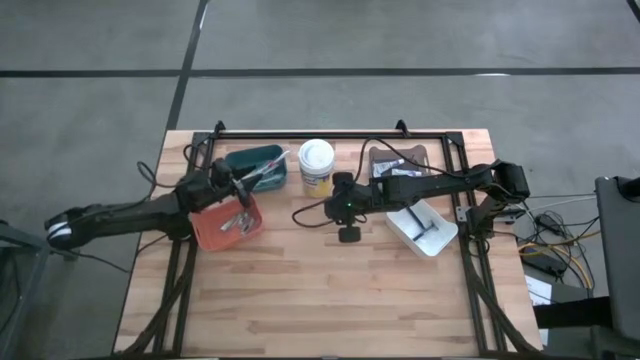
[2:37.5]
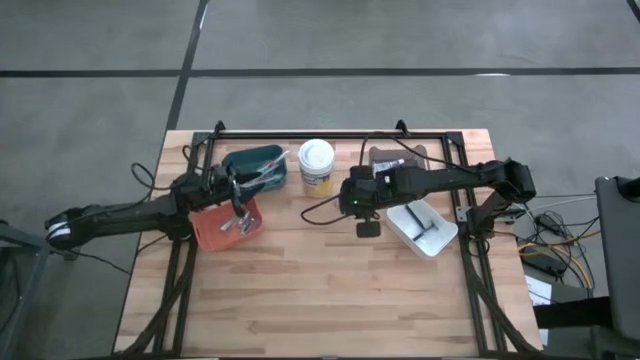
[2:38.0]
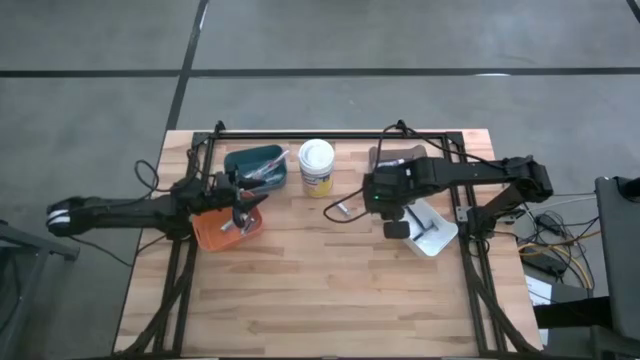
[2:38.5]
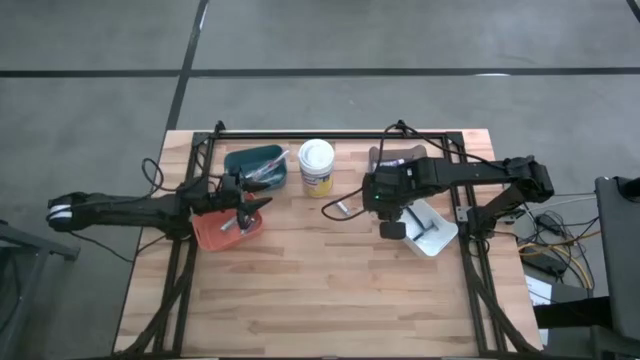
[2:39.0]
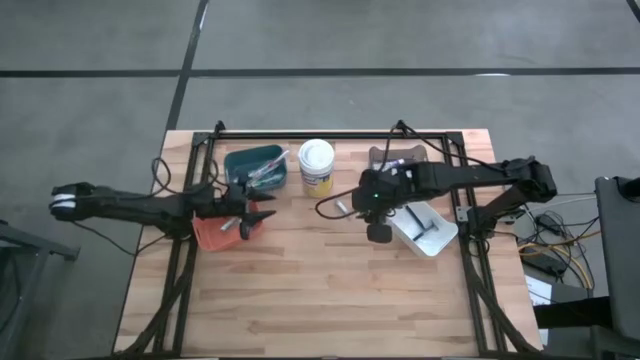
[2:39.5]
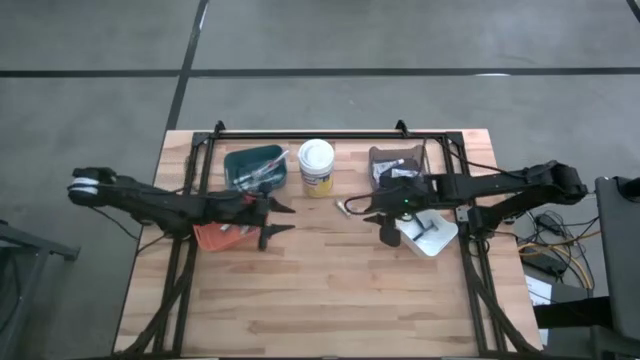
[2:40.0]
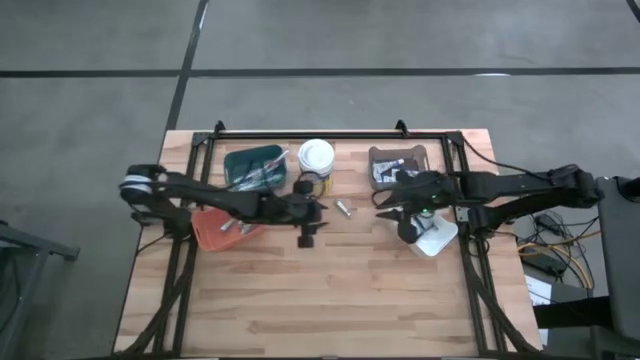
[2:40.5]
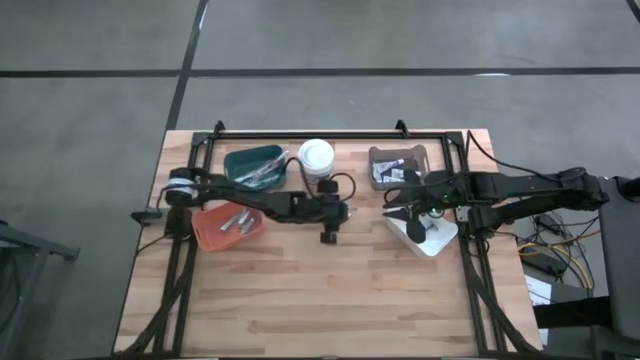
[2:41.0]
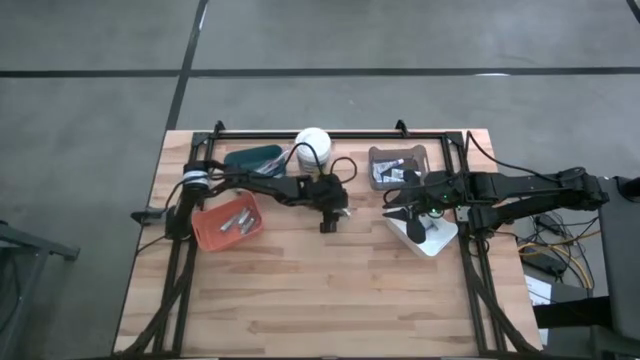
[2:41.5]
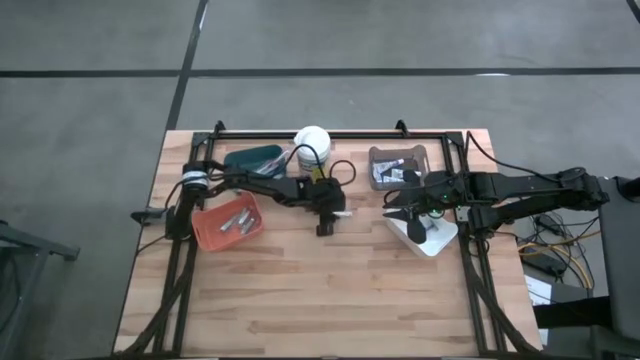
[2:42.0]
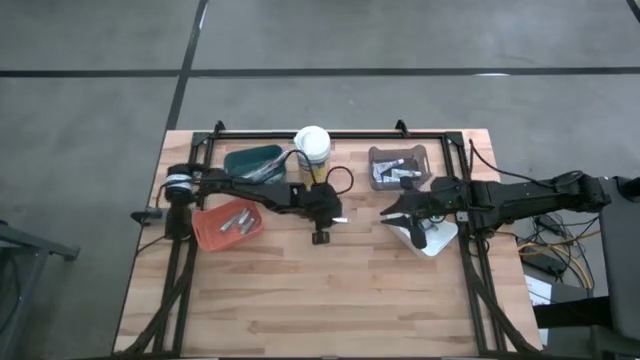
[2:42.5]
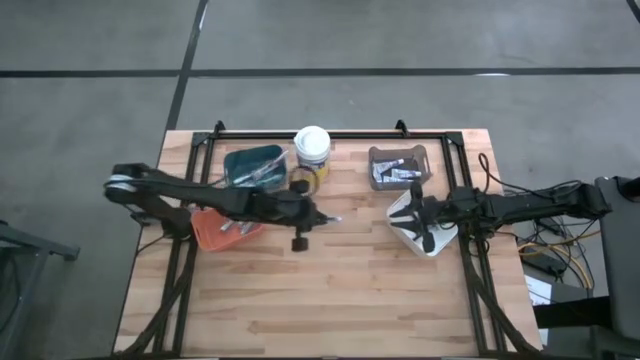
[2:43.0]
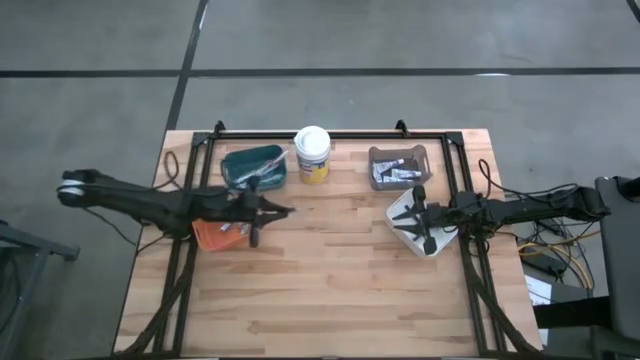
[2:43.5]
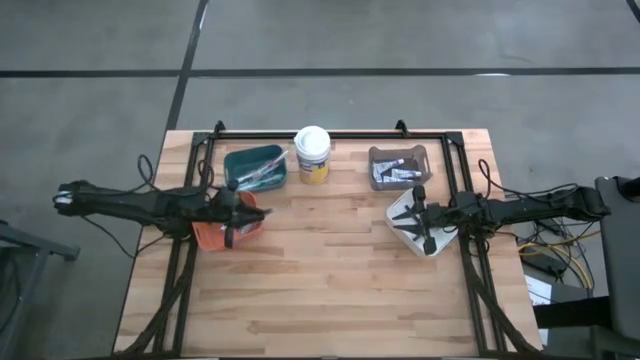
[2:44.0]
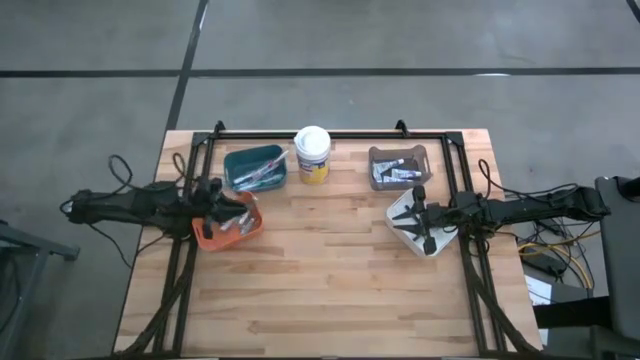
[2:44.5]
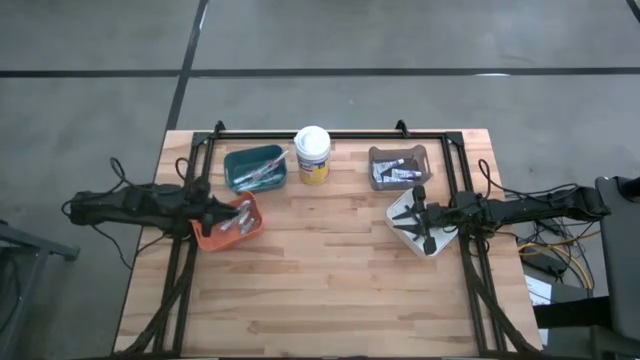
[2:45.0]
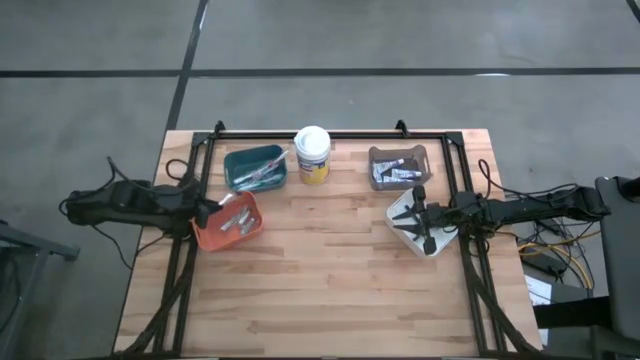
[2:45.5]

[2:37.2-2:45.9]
Task: Pick & Place Travel size toiletries
Put the nail cutter into the orange bin

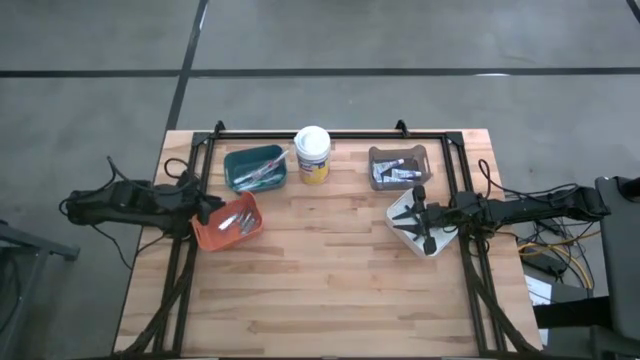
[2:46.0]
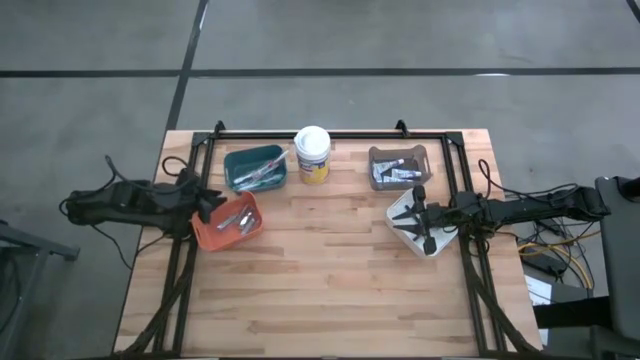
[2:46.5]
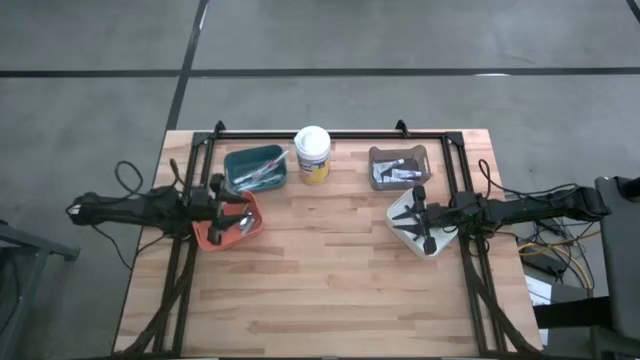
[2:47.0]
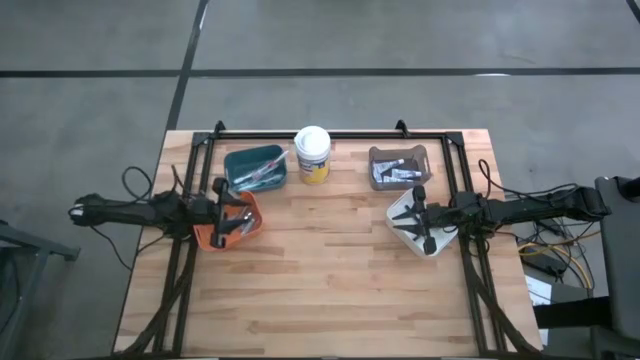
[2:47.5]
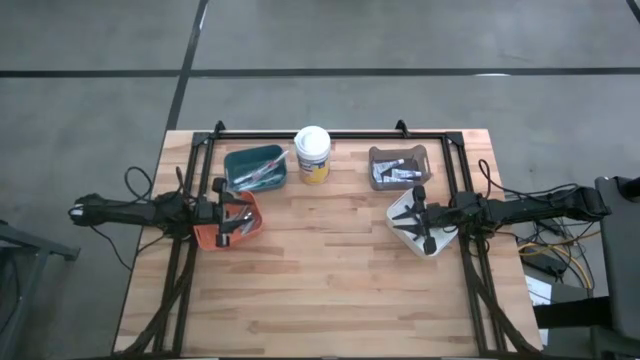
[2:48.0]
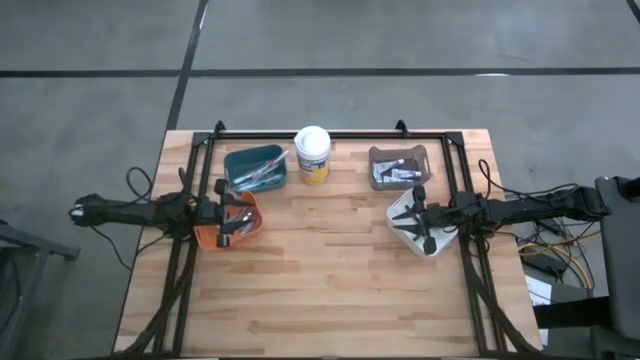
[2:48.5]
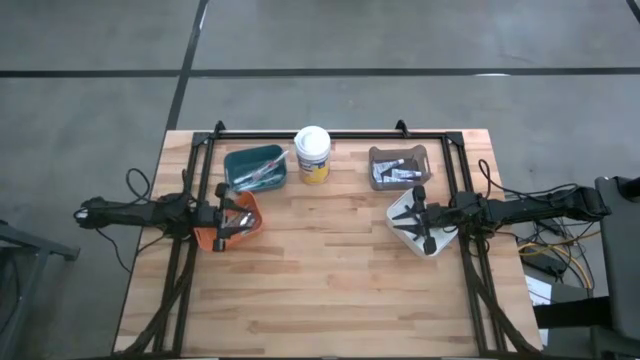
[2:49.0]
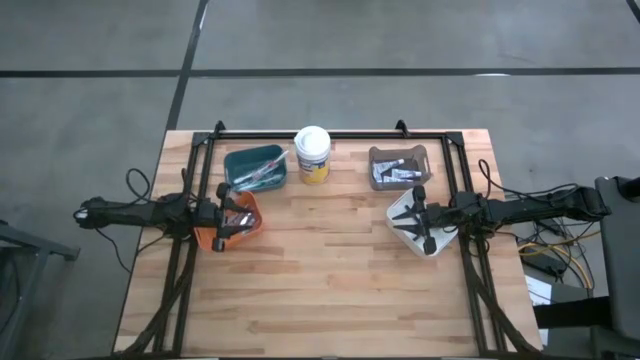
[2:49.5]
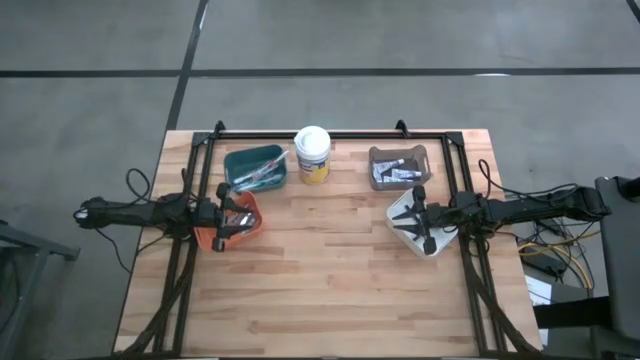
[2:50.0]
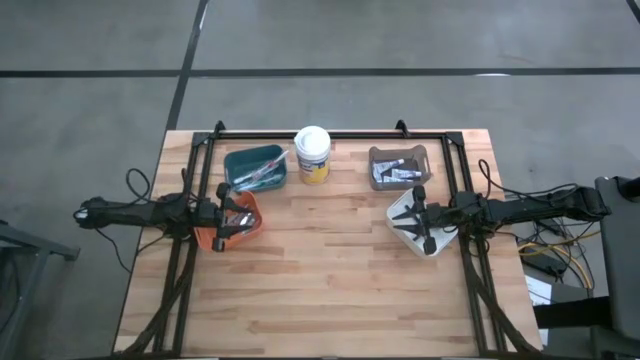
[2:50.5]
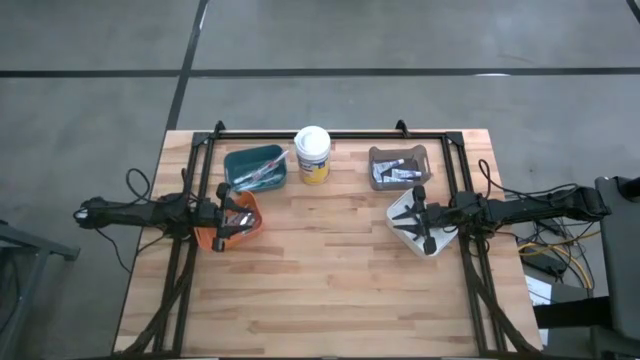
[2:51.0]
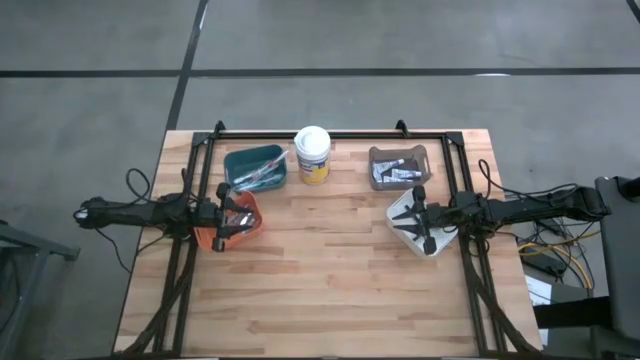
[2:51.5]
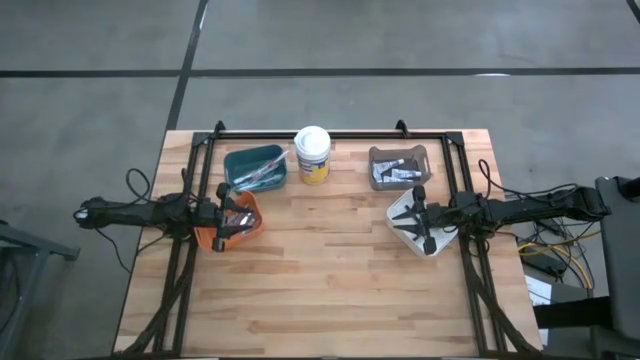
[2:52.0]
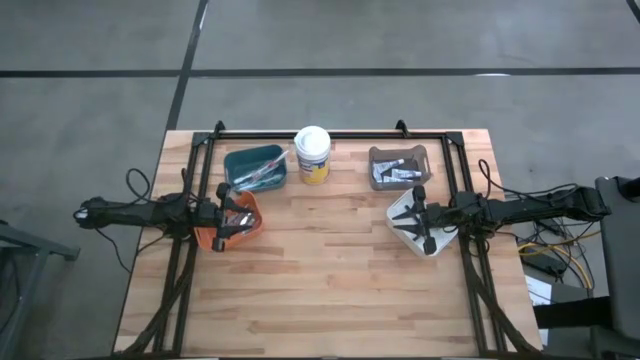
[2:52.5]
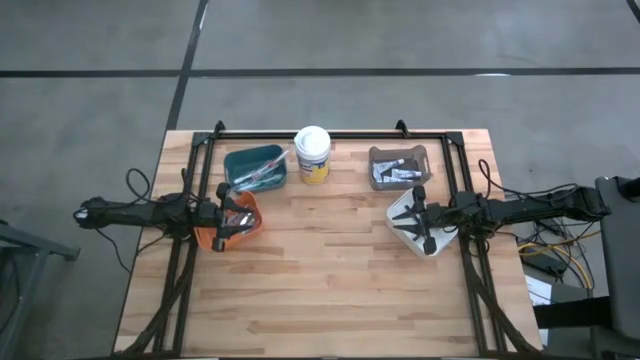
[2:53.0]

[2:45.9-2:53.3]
Return to Home Position

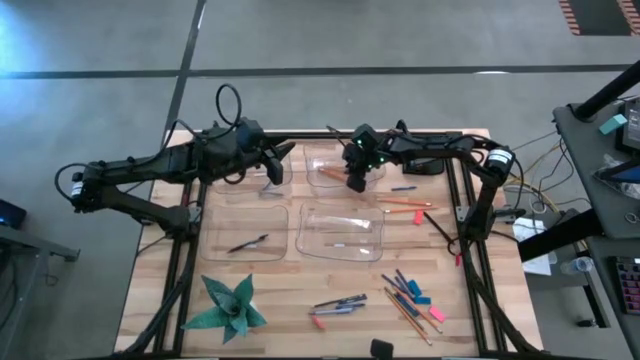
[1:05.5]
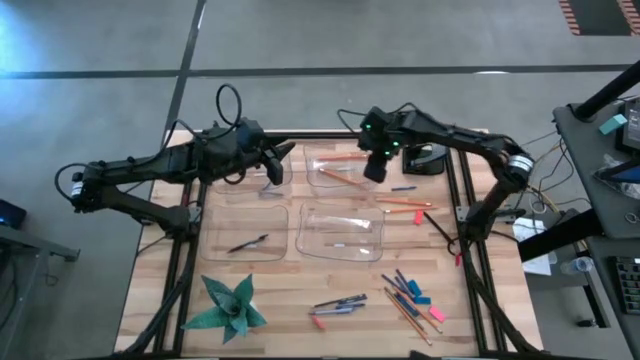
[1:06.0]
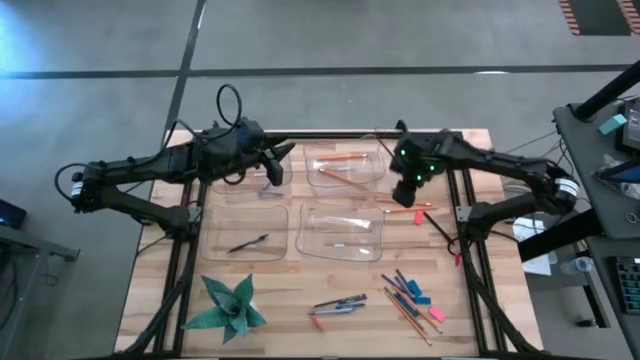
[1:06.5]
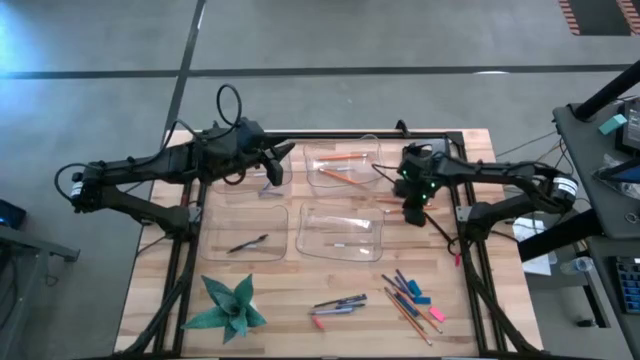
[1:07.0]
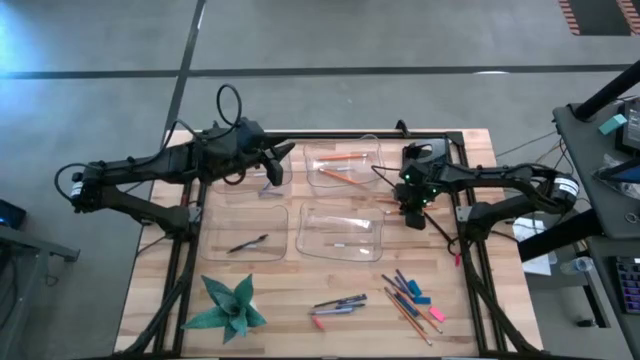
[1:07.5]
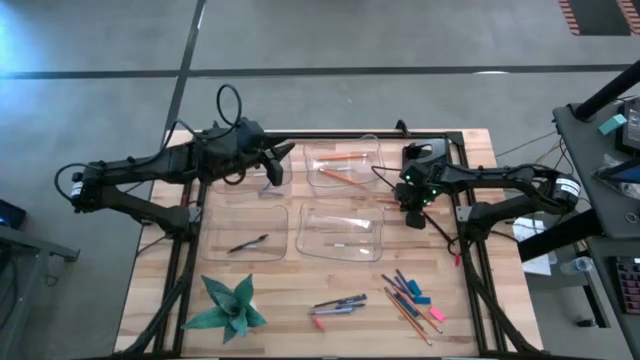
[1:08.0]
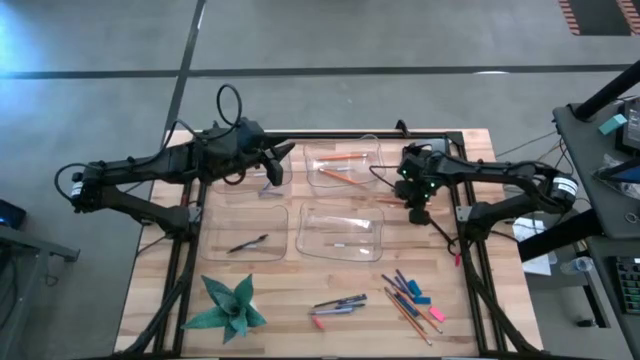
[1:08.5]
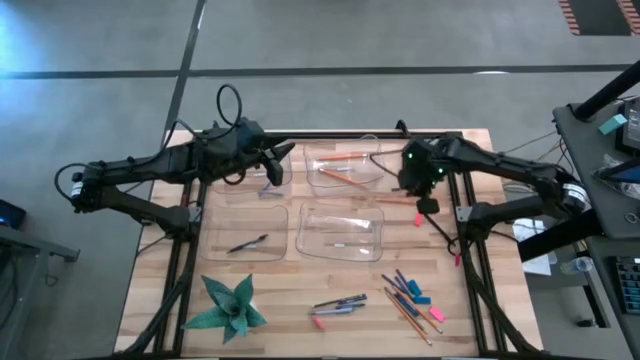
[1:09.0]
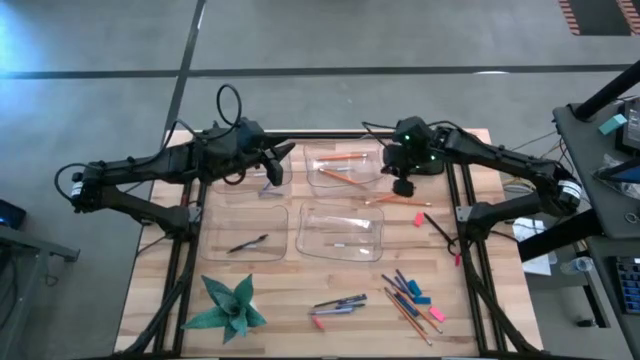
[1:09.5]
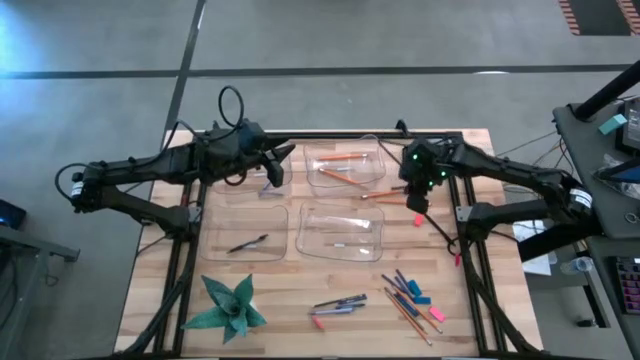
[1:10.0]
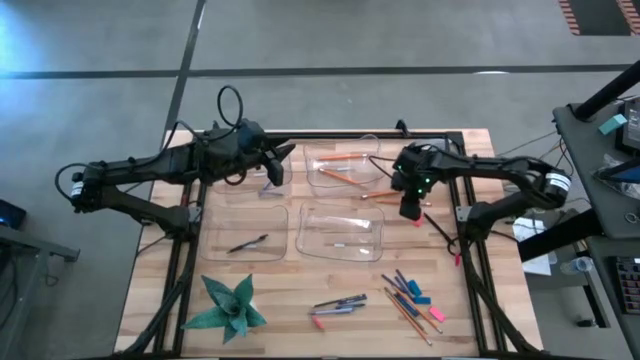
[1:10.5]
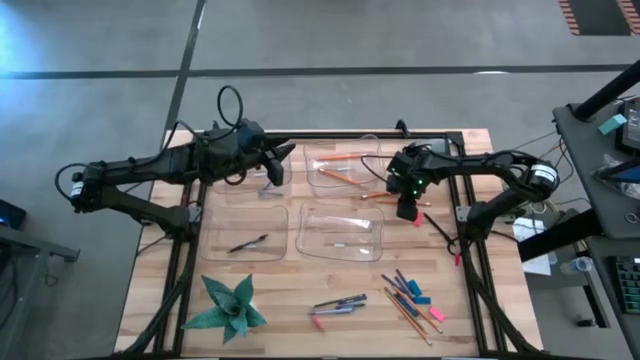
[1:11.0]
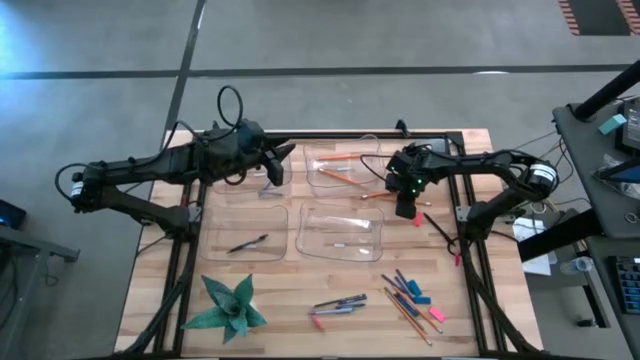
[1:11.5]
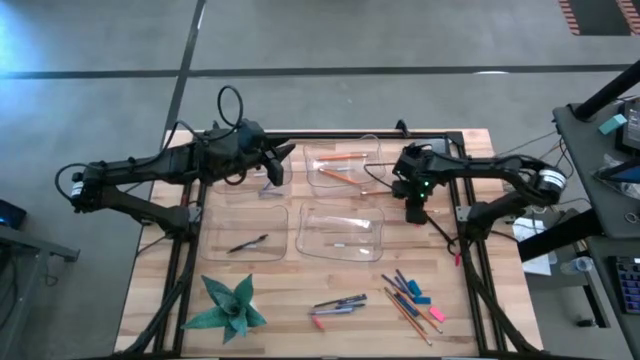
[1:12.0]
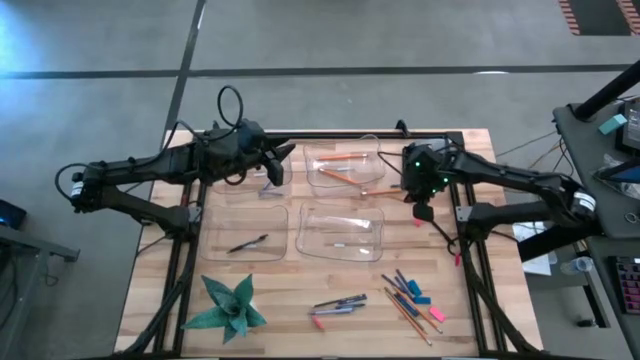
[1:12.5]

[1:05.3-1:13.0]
Task: Sort crayons/erasers/pens/pencils in bins
Put the orange pencil into the top right transparent bin
